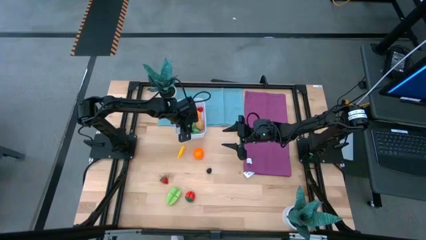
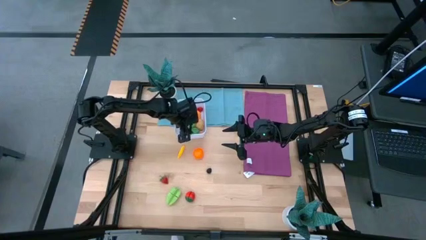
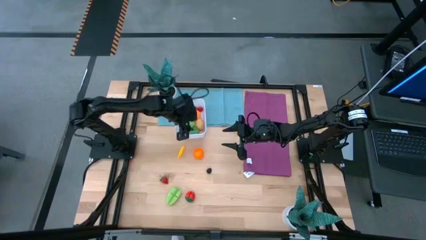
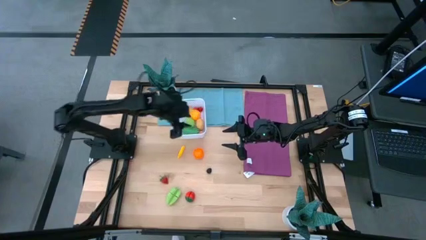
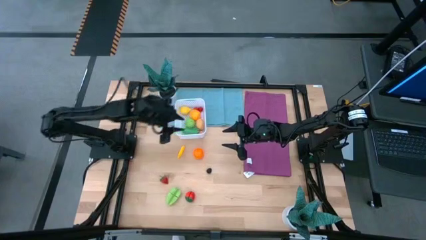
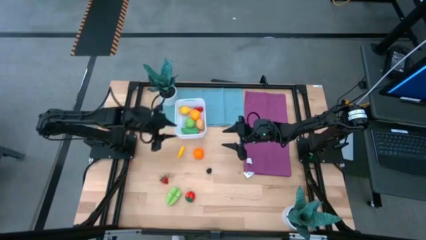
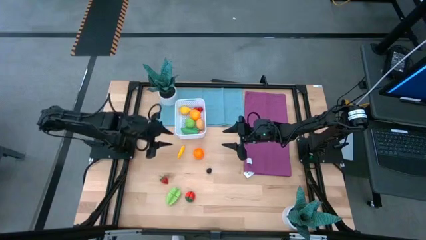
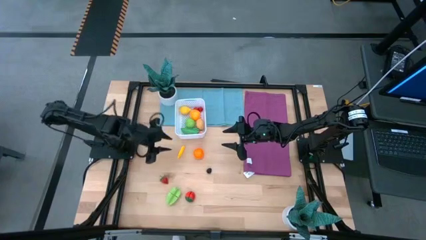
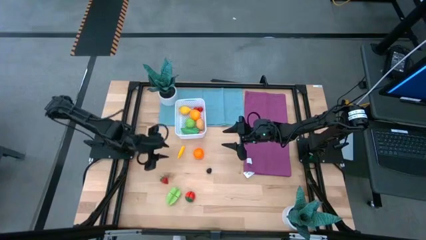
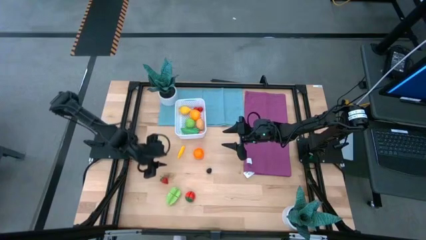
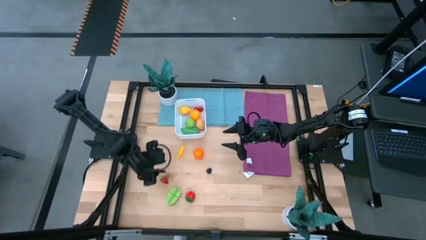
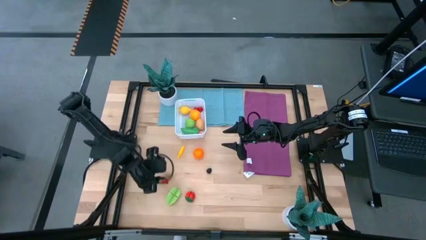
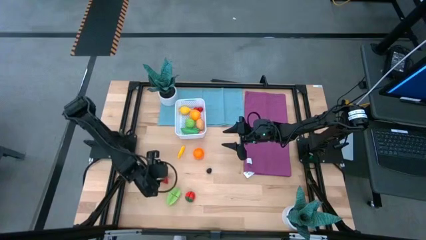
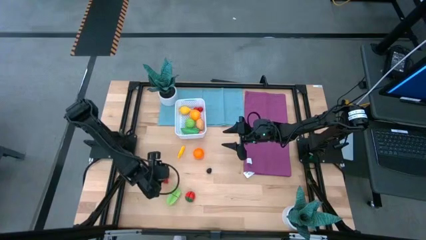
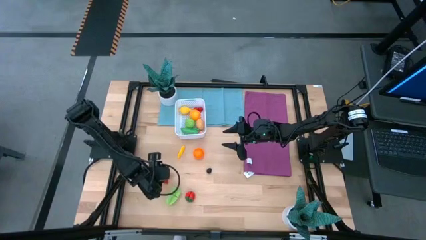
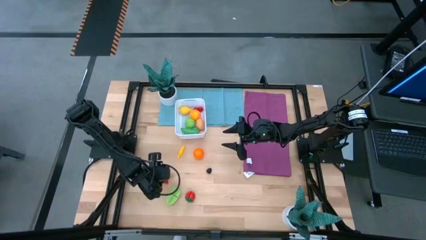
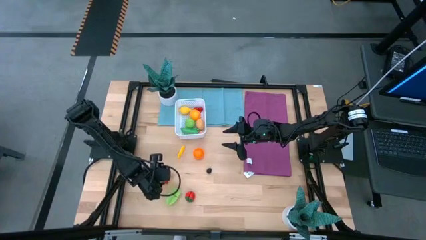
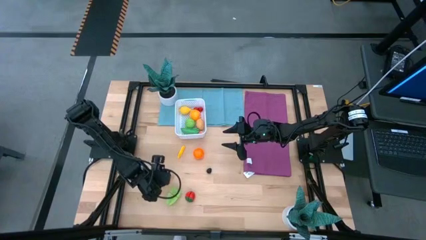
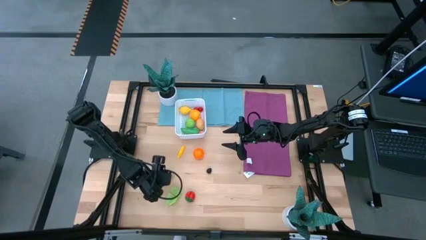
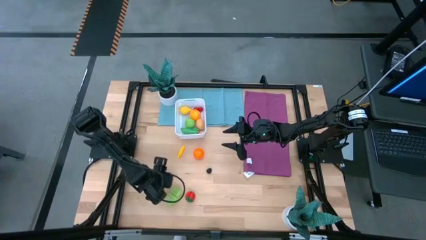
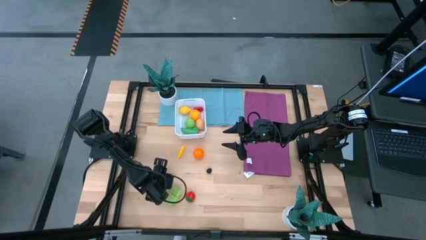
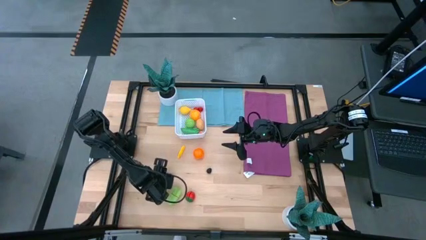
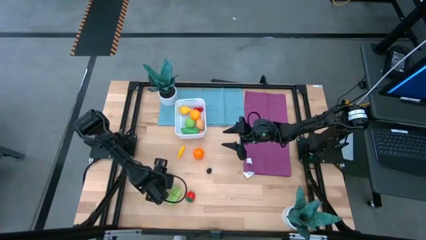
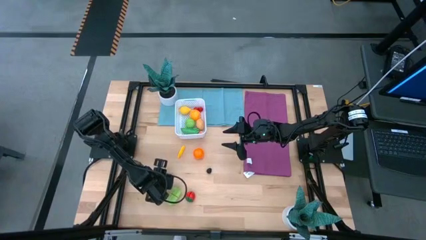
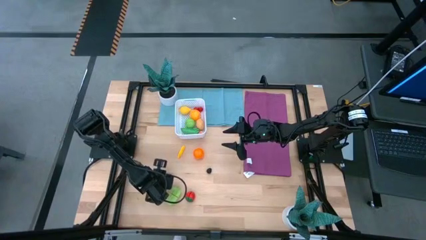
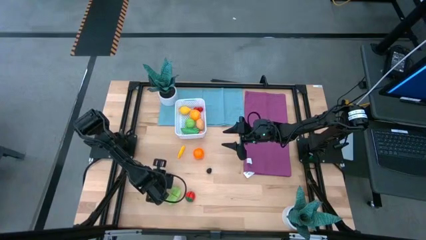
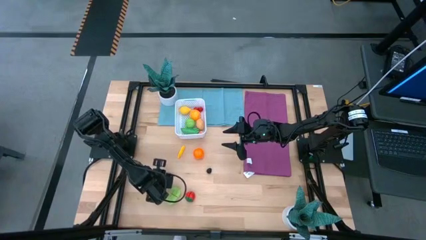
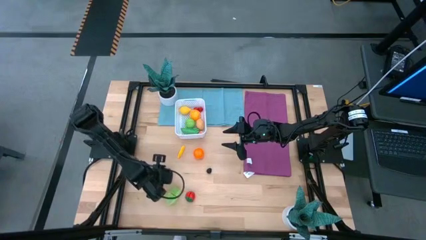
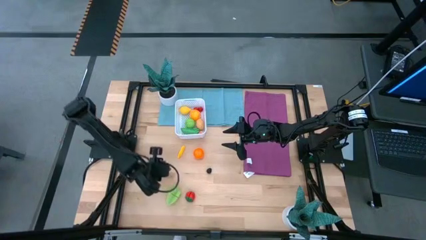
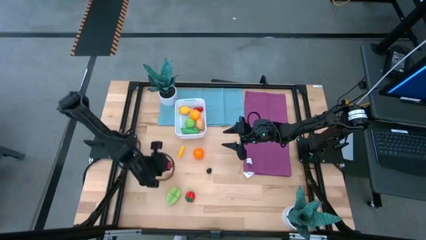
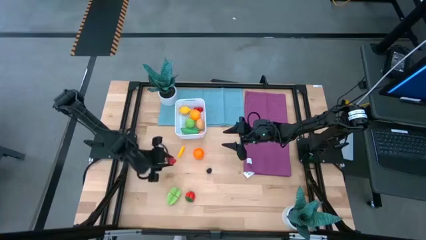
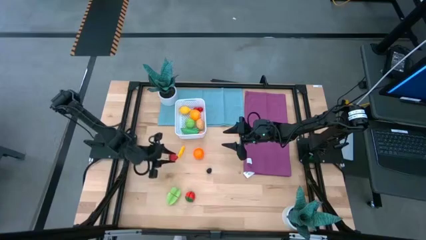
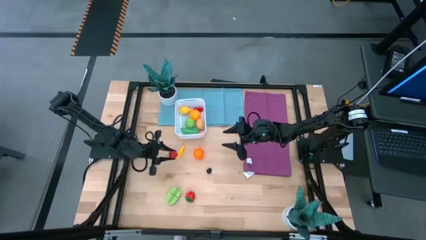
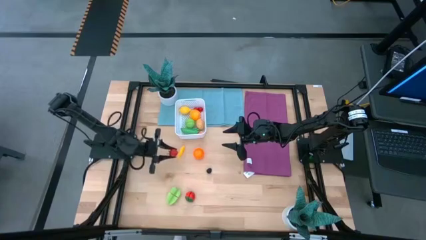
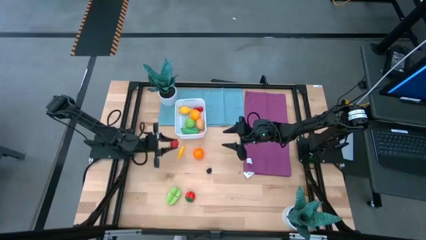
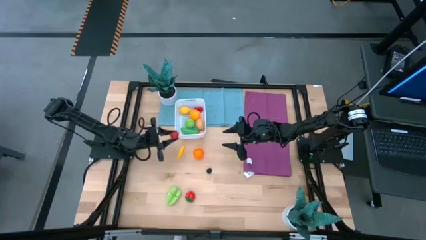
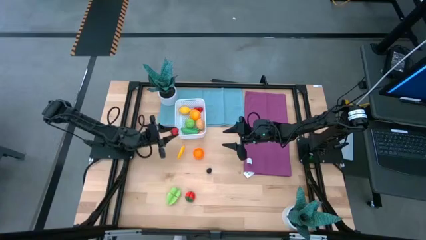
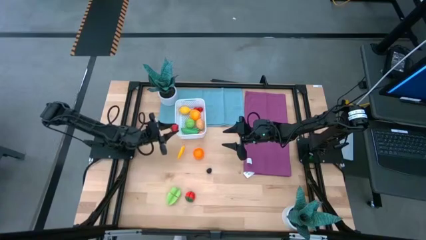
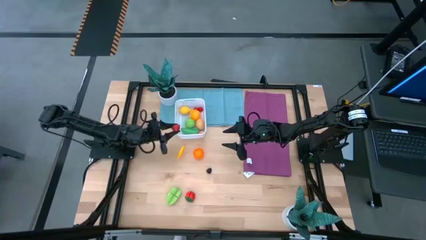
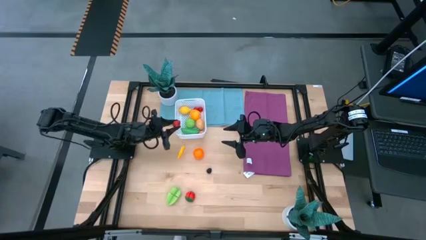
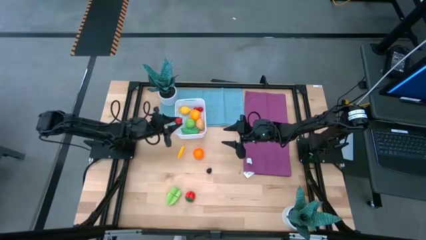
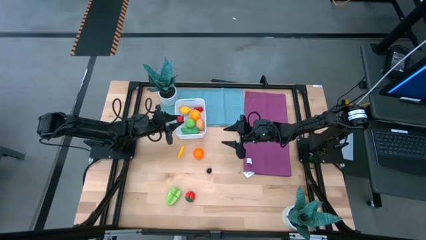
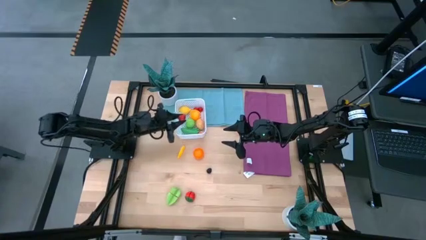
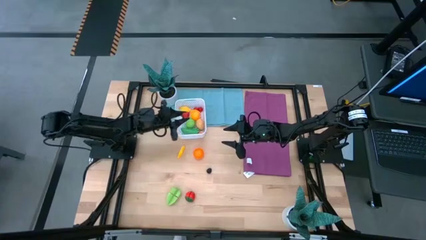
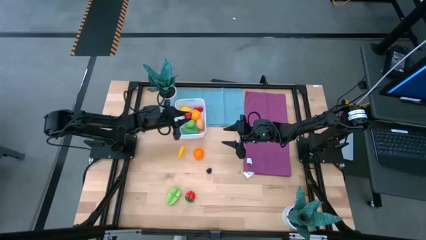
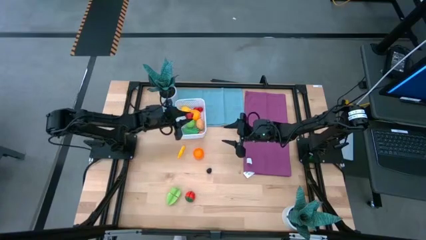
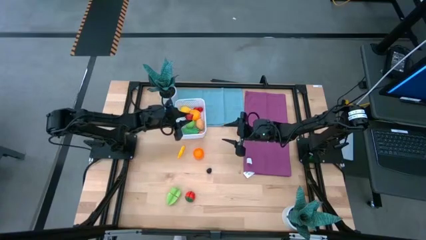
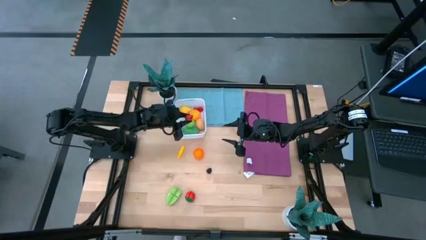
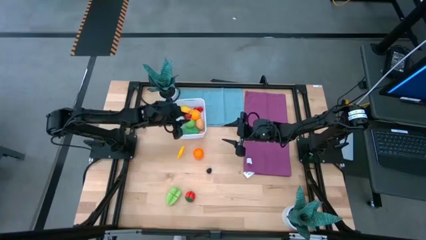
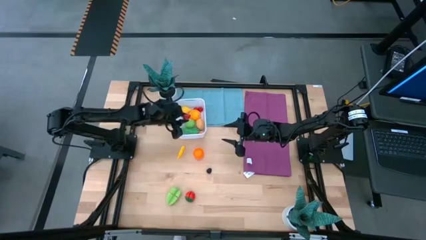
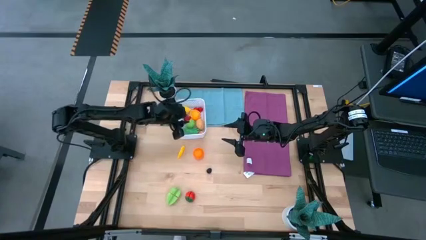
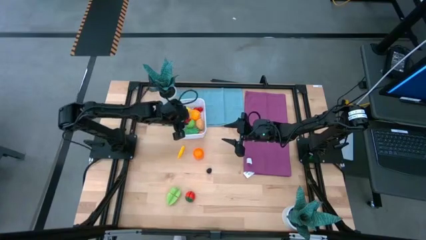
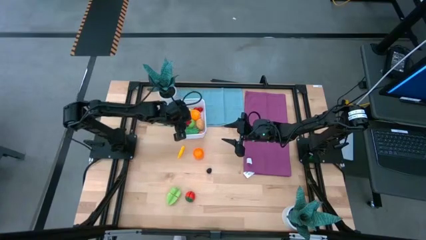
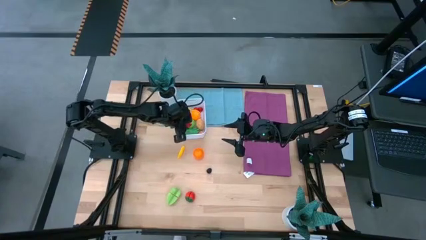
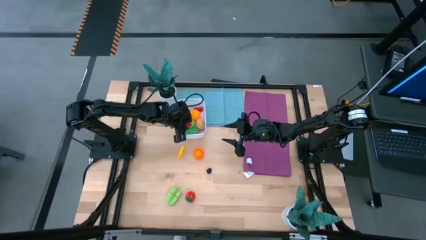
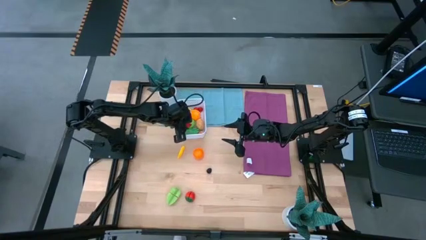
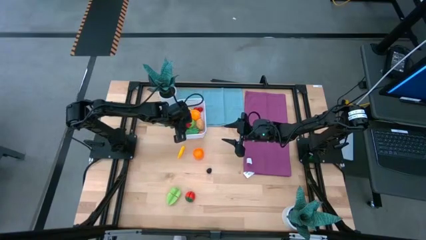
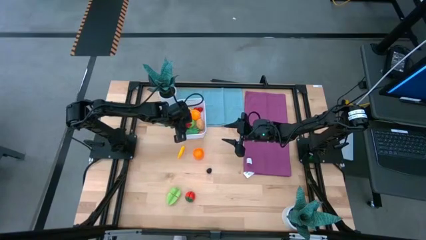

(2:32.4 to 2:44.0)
Task: Pick and placing Produce into tupperware
Put the top red strawberry into the white basket

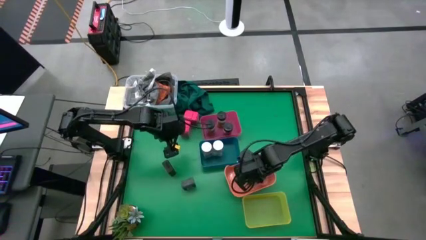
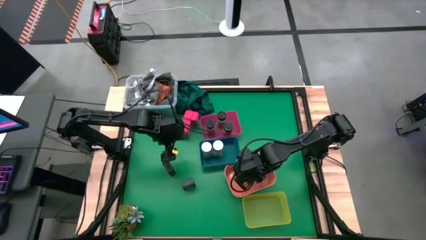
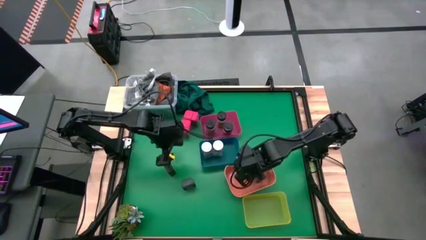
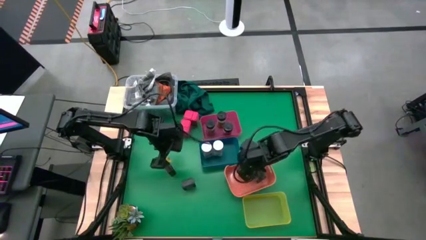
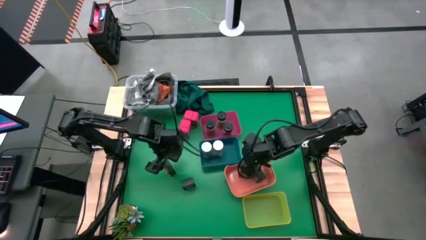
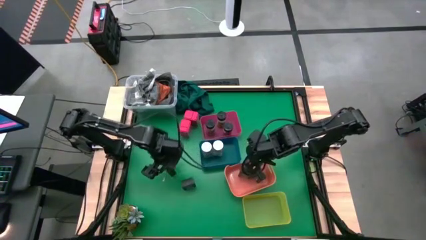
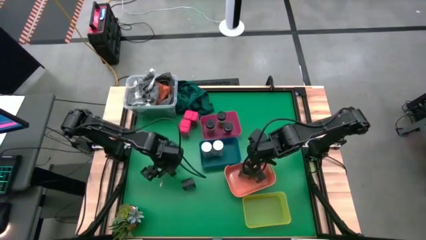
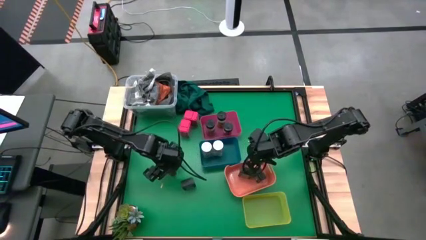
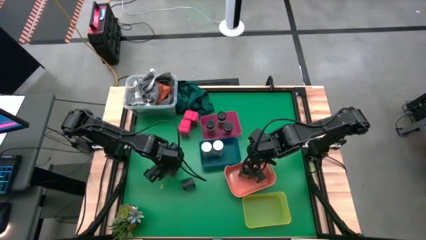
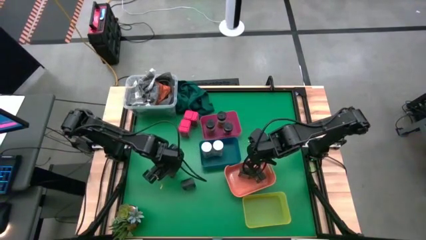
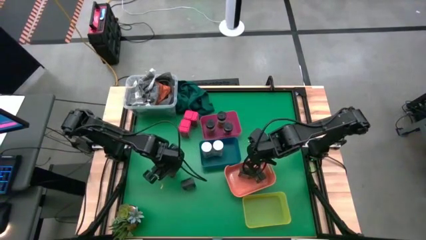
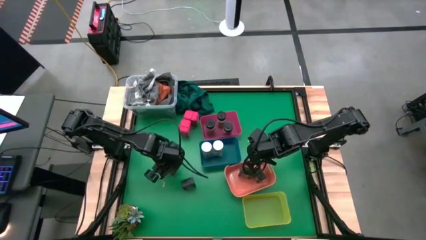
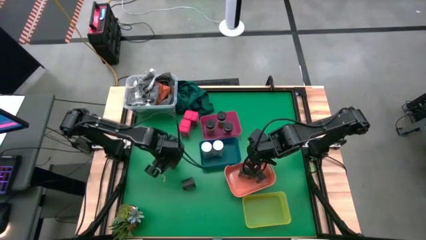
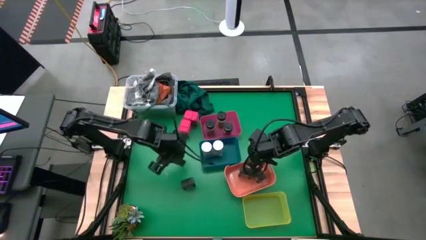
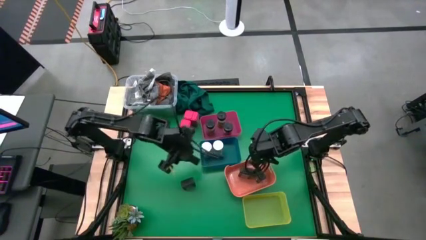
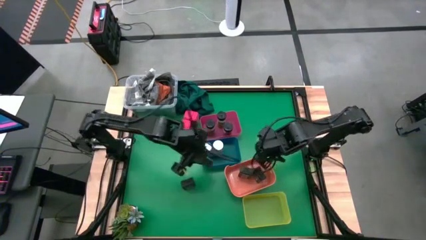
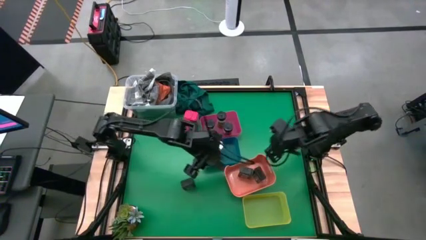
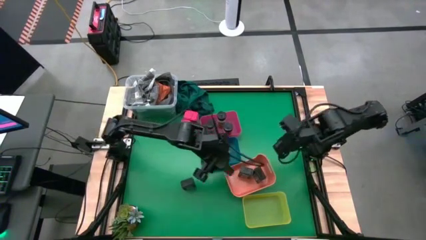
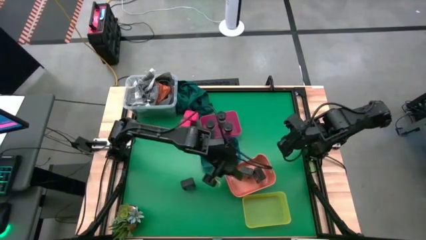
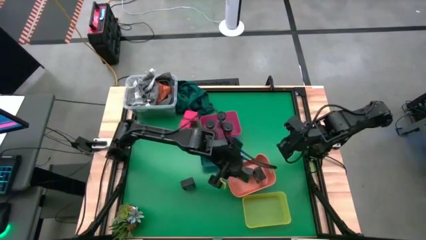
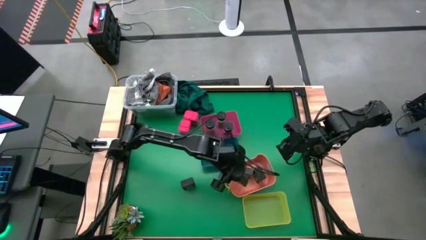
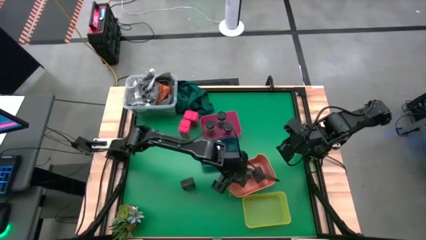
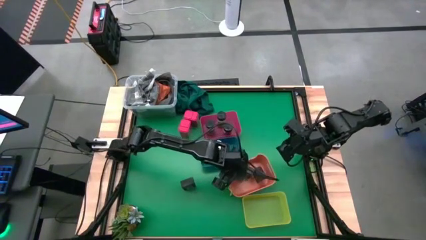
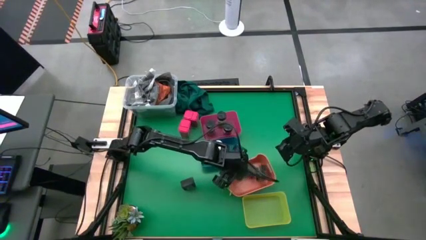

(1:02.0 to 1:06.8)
Task: Sort spices by type
Put the top black seasoning can into the orange bin

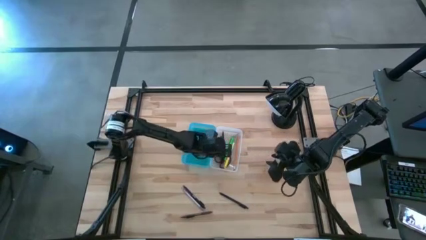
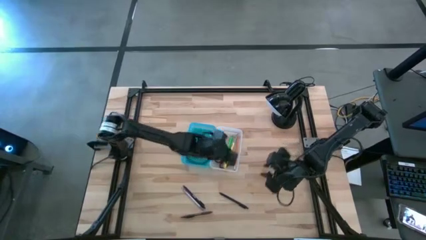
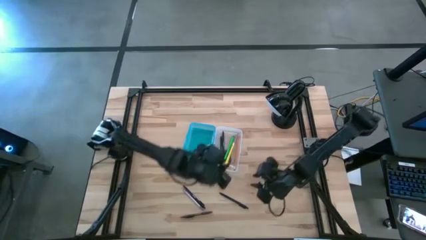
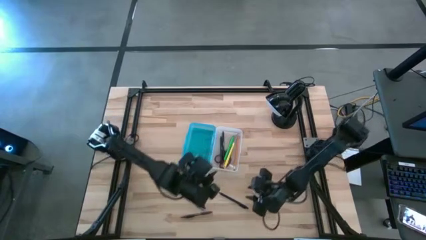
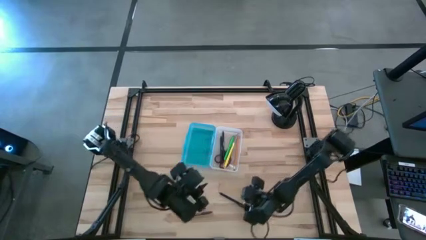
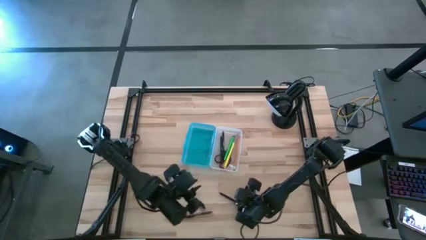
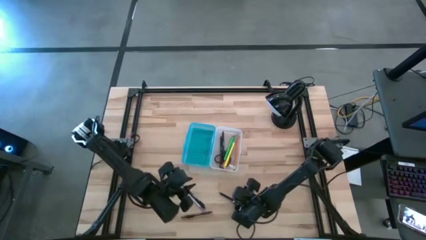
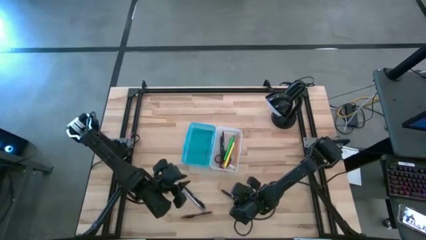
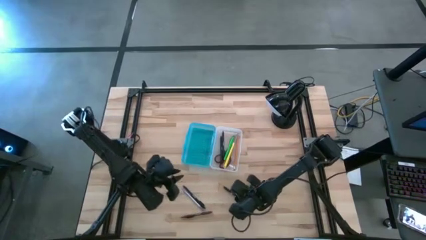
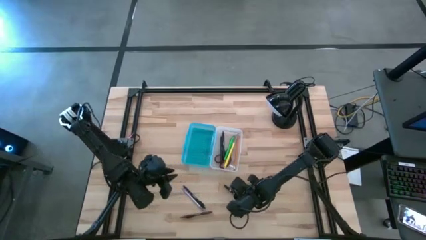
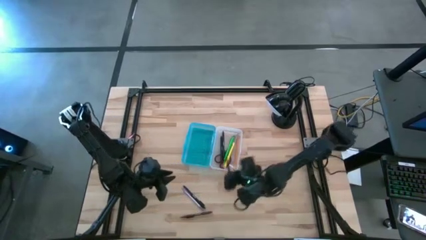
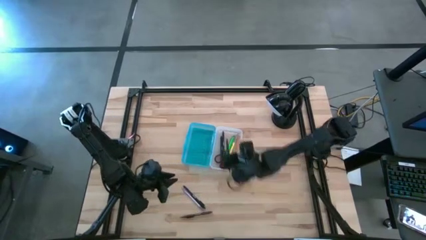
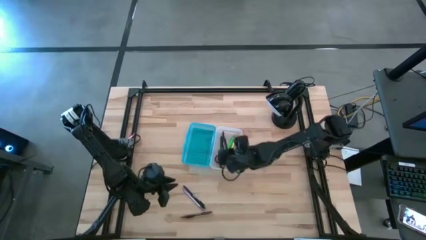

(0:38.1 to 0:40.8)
Task: Pick & place school supplies into a supply box
Put the black pen into the supply box
